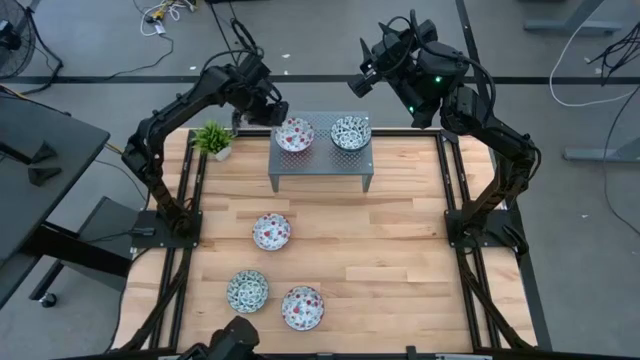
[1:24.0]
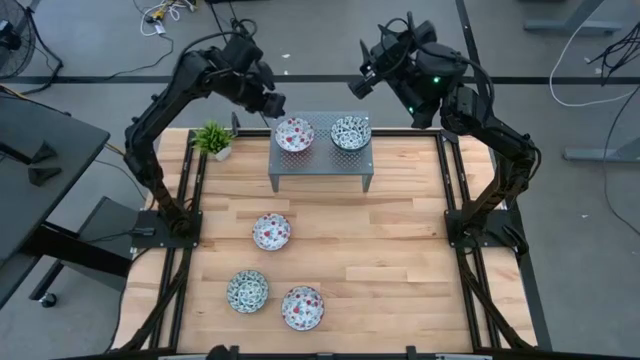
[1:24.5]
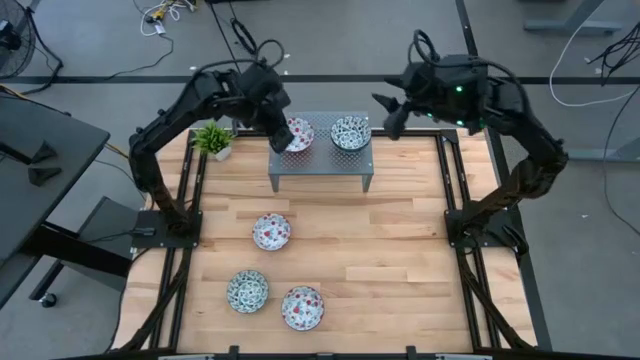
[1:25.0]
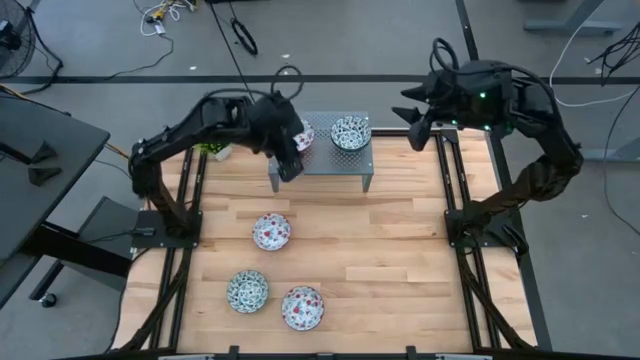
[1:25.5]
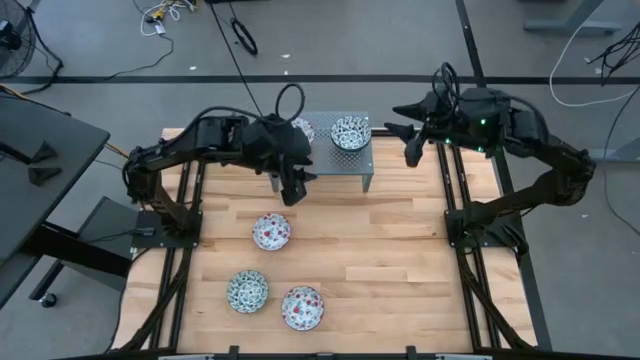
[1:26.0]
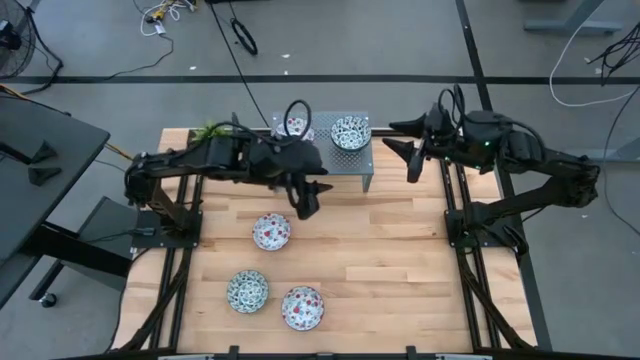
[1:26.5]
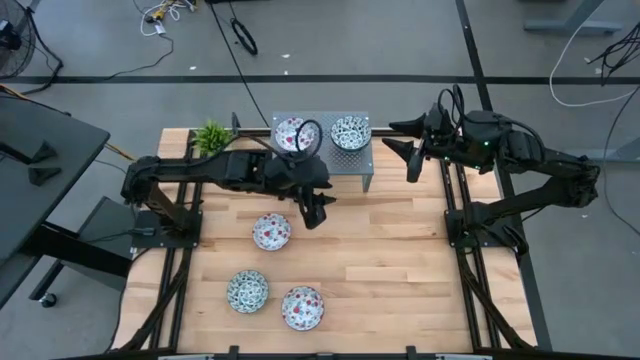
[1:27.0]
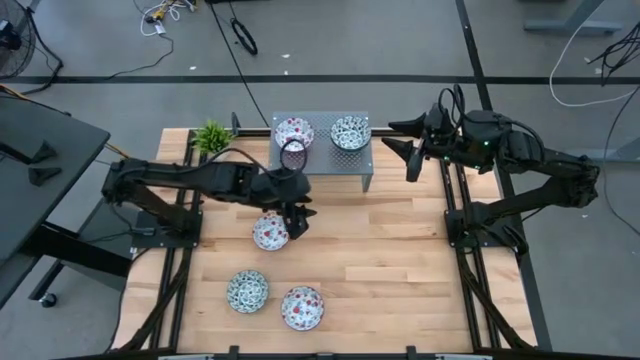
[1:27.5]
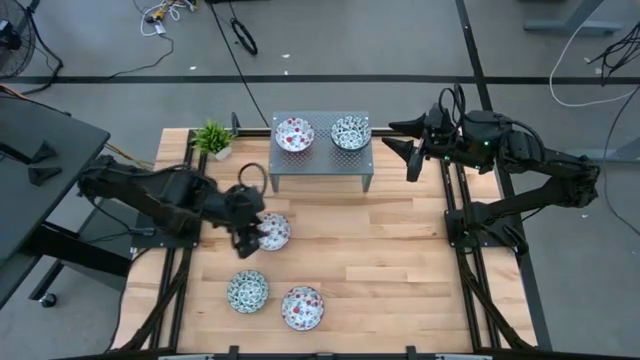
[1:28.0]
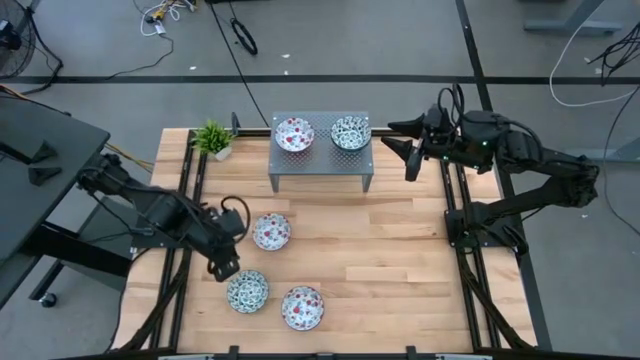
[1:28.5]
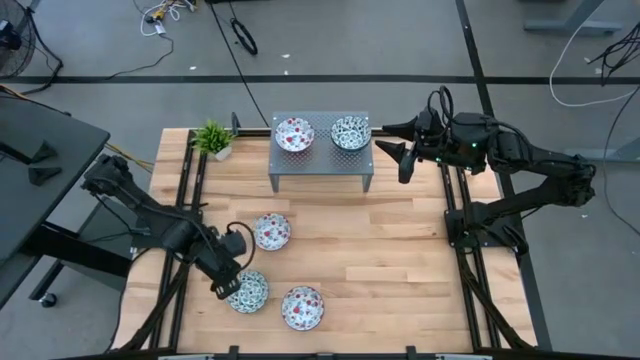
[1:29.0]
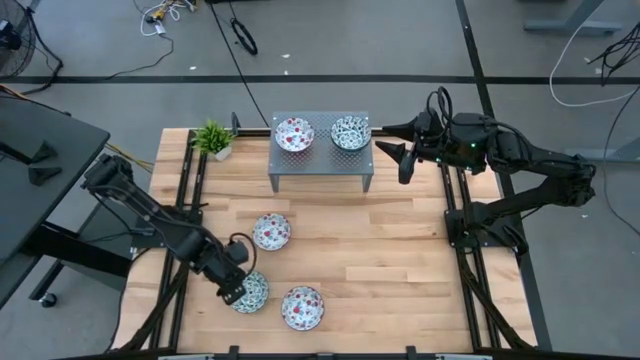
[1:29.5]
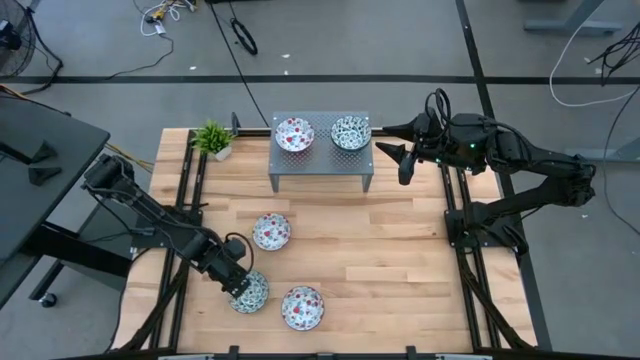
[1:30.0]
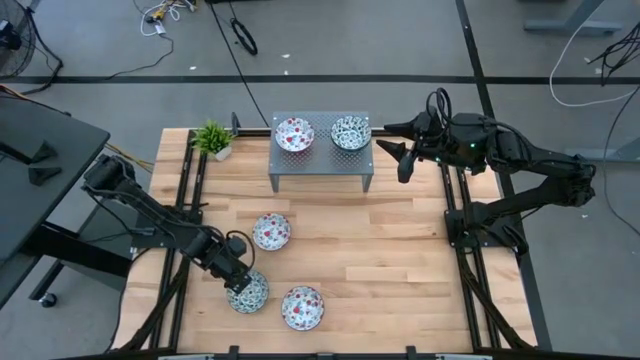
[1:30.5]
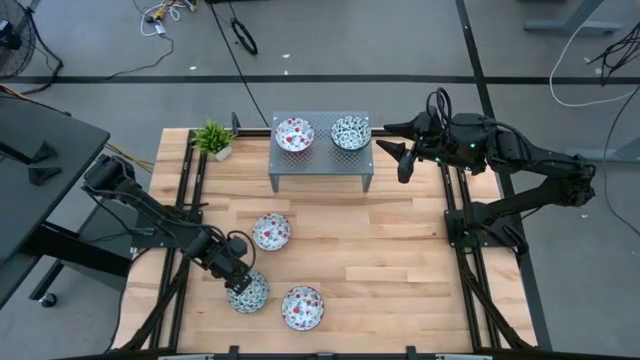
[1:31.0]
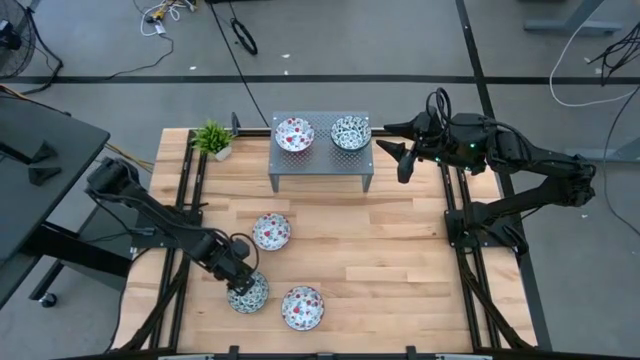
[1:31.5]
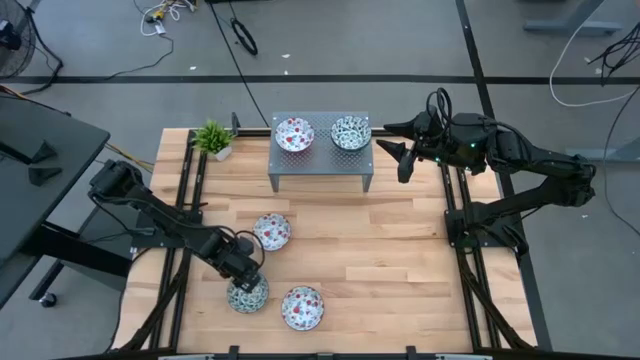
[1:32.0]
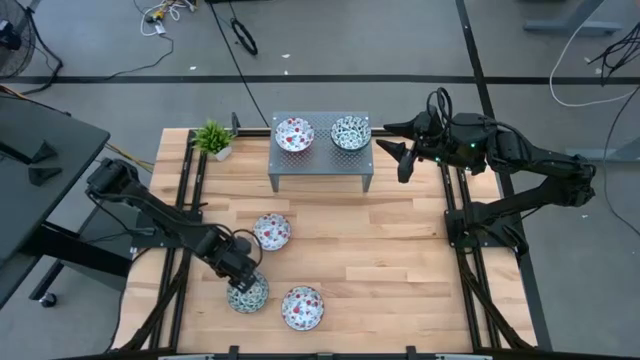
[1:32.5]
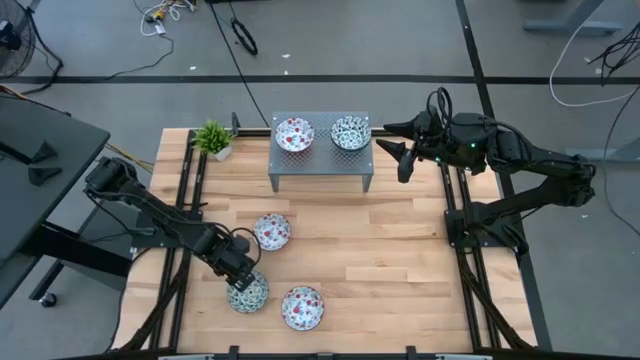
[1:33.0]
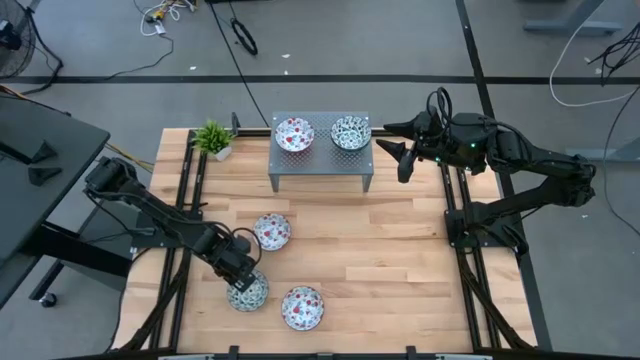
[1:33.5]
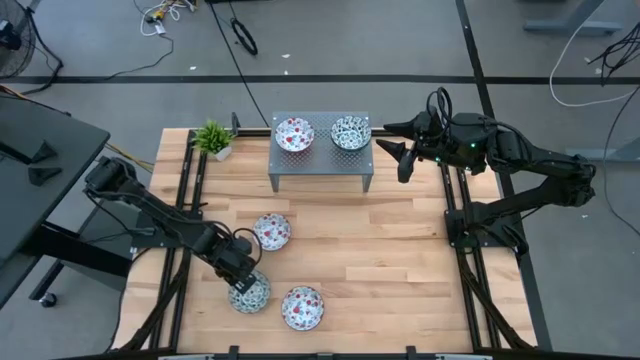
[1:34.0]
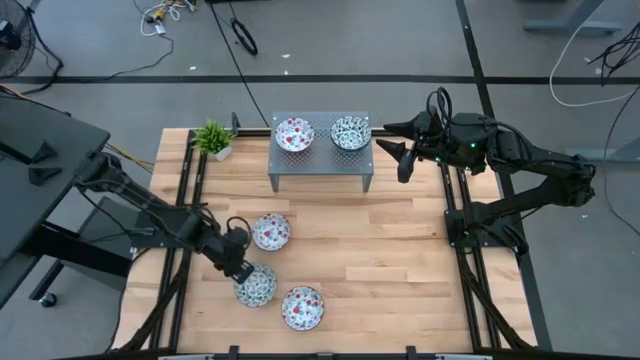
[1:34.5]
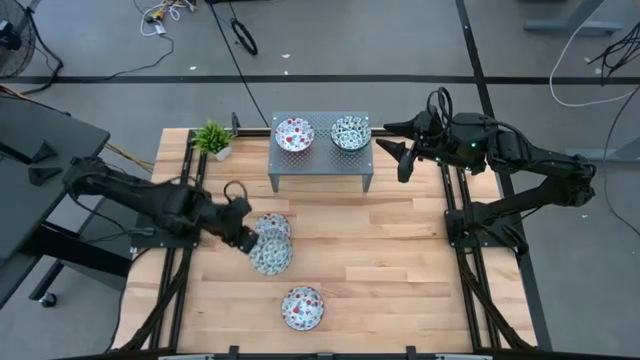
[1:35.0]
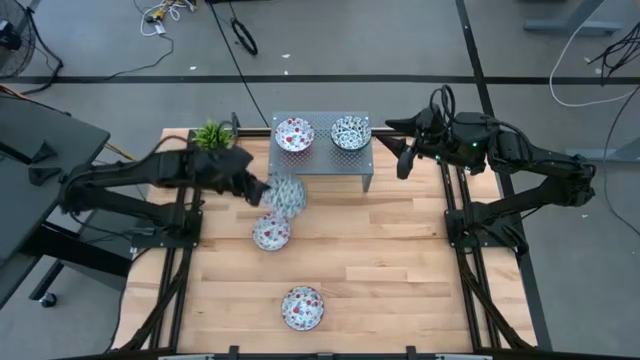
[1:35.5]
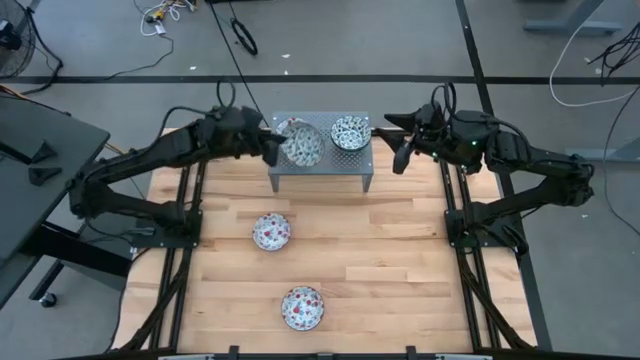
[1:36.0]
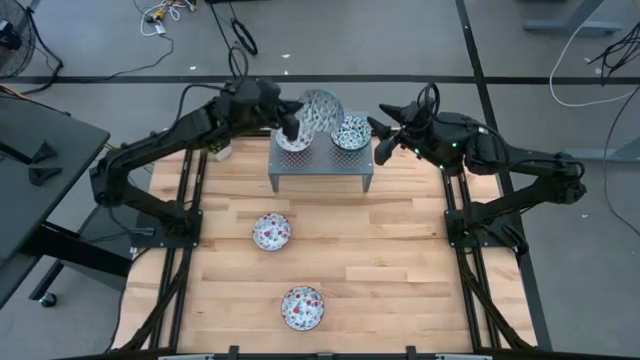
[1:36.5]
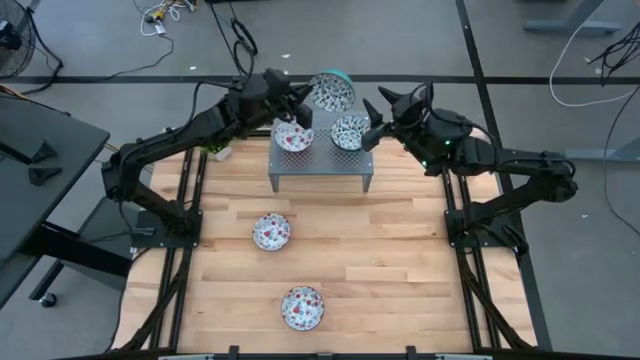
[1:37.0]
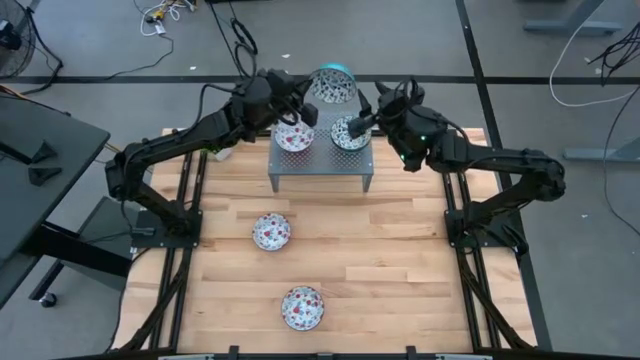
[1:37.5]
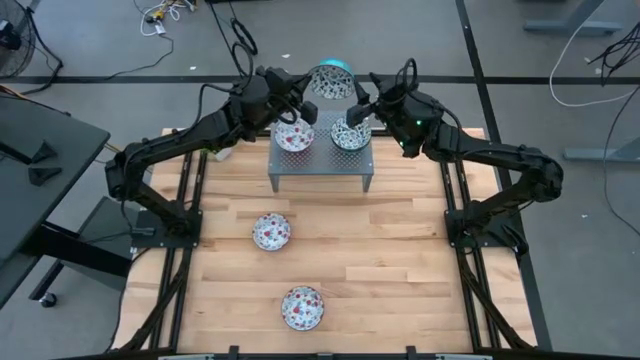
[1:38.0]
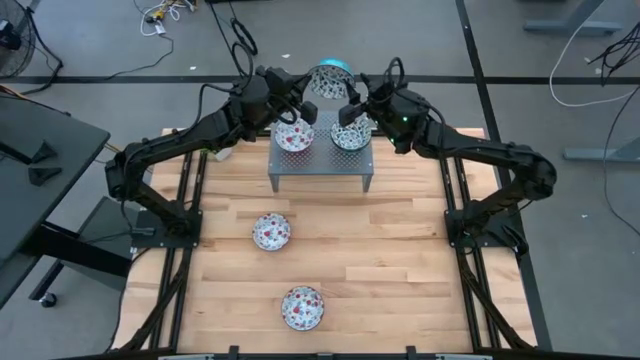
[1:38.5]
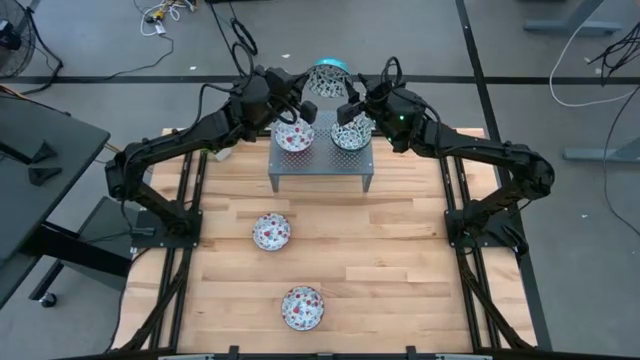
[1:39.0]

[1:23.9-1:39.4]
Task: Pick & Place Mini bowls
Stack the top blue and white patterned bowl on top of the other blue and white patterned bowls on the shelf

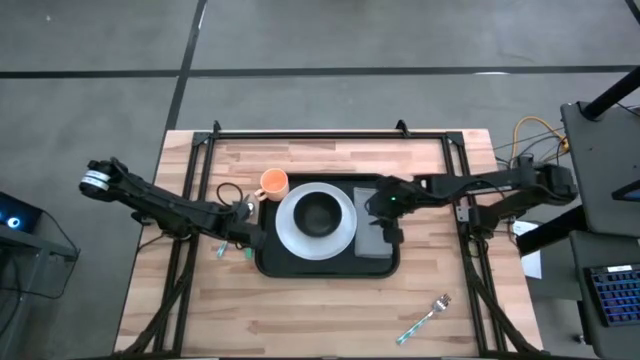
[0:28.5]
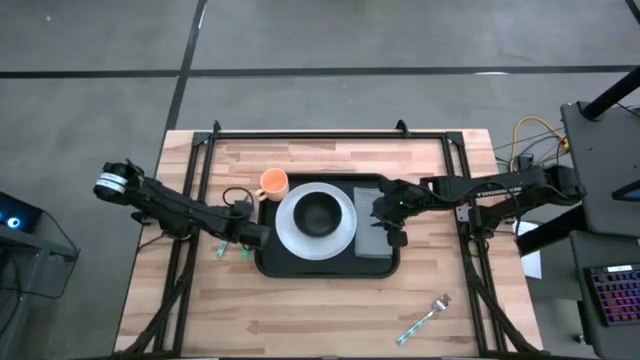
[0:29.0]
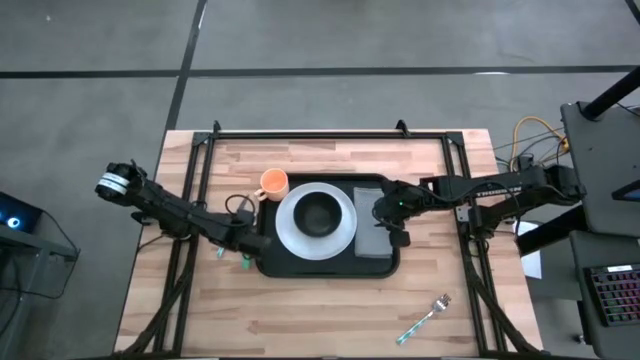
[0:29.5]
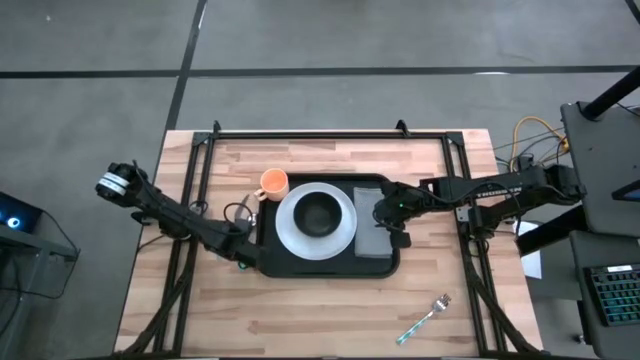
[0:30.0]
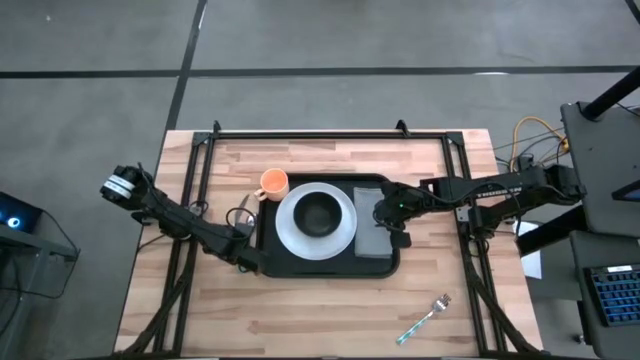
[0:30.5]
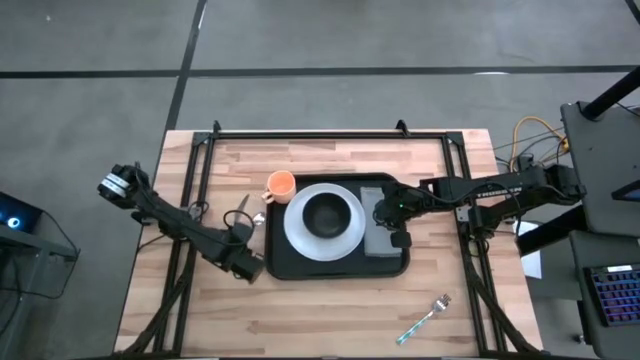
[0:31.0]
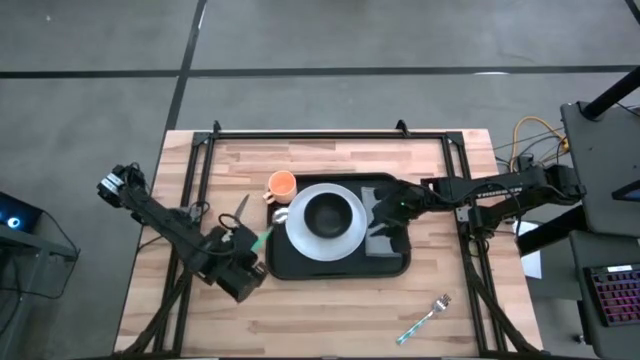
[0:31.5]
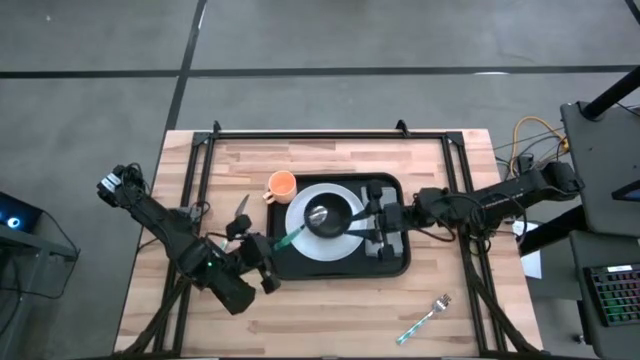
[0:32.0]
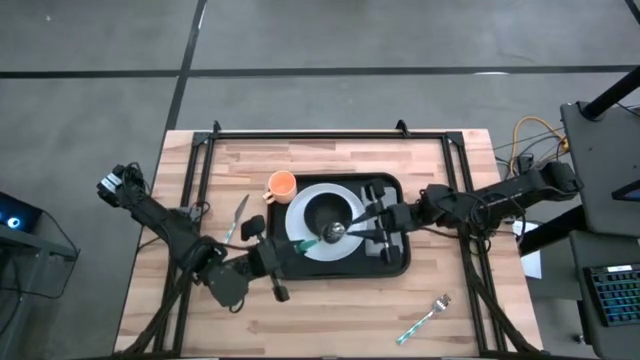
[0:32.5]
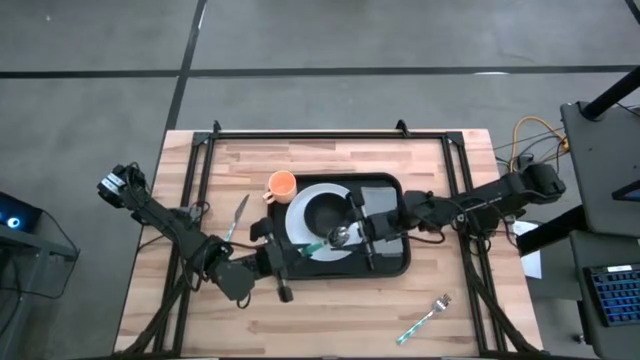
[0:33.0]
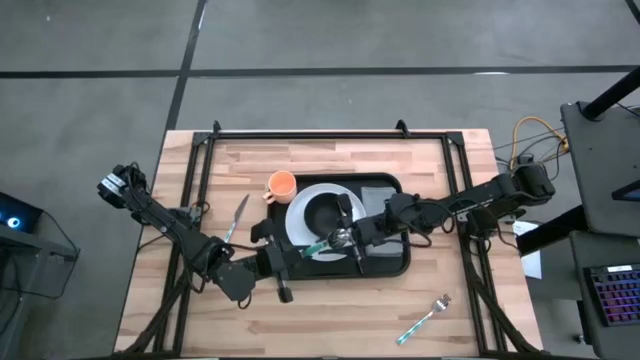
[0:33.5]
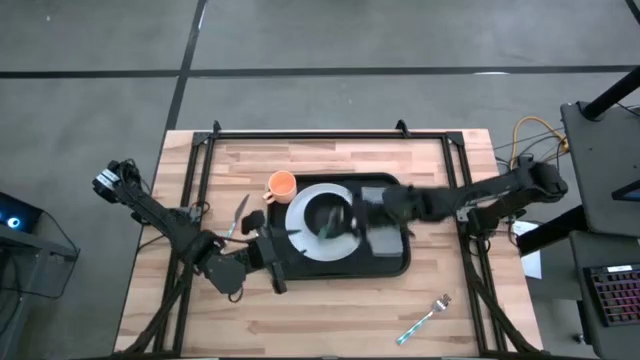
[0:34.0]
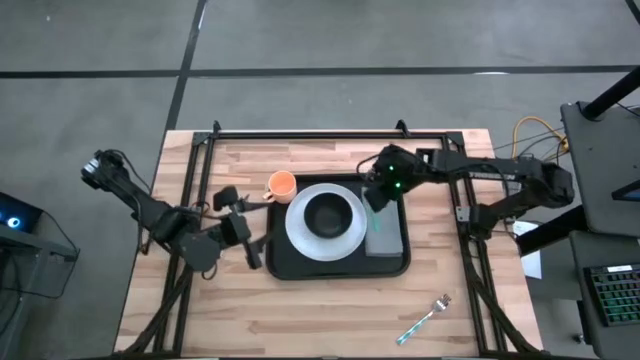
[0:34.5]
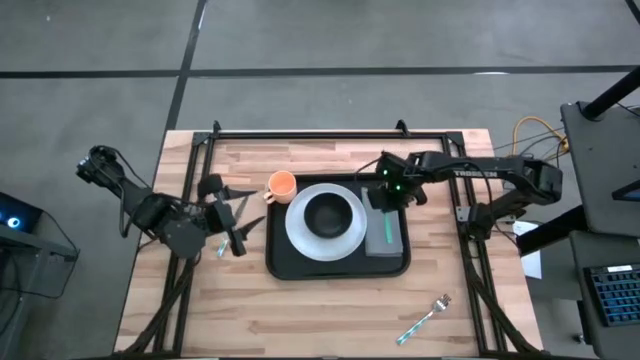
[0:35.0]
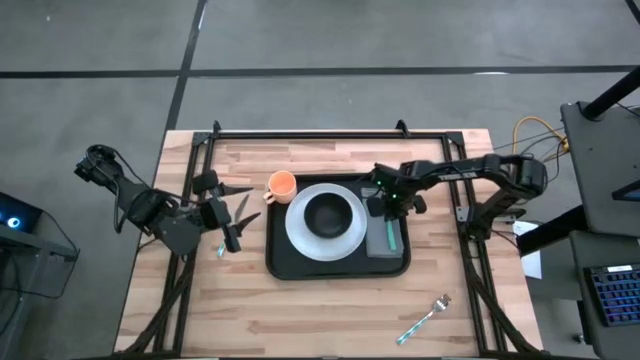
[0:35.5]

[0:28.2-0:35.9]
Task: Set up tray
Put the green spoon on top of the grey table napkin
